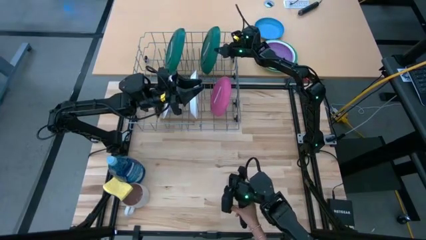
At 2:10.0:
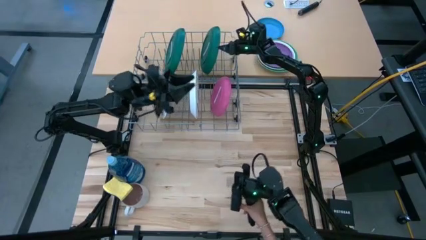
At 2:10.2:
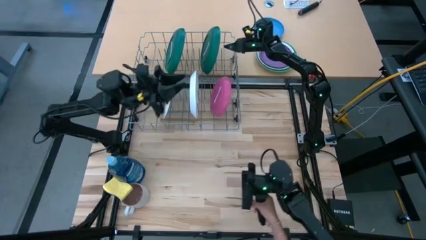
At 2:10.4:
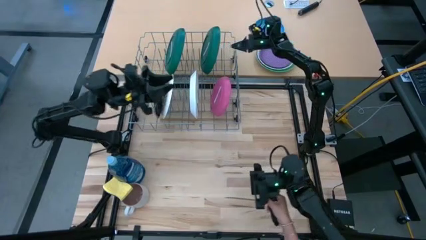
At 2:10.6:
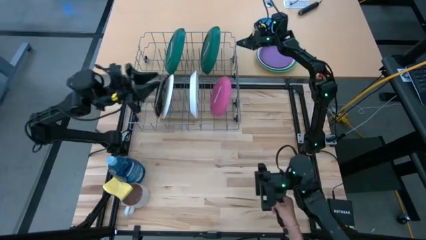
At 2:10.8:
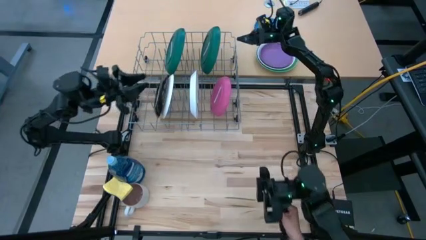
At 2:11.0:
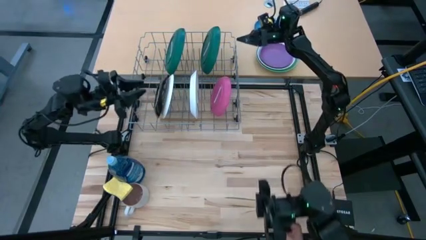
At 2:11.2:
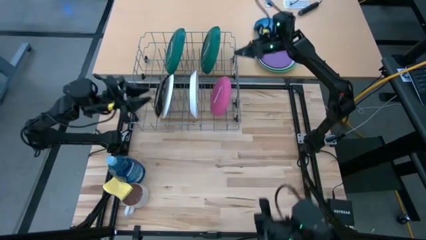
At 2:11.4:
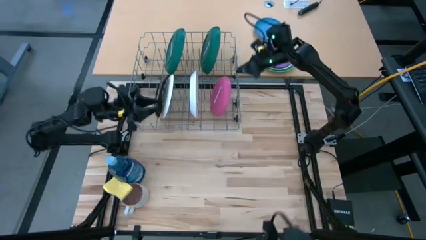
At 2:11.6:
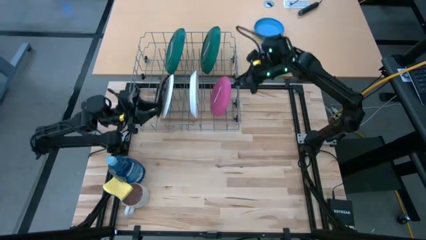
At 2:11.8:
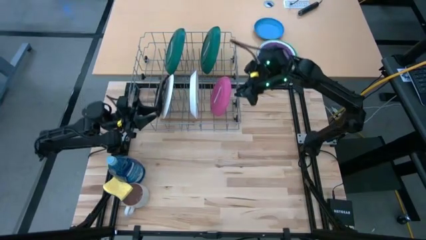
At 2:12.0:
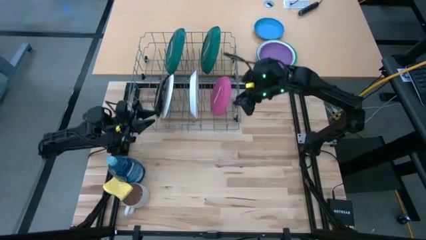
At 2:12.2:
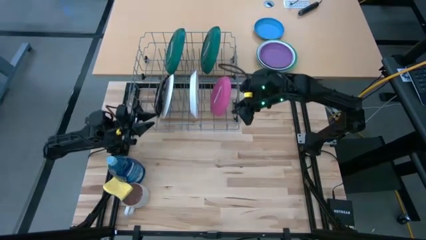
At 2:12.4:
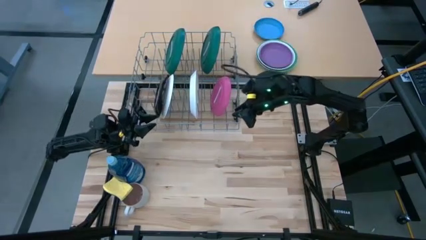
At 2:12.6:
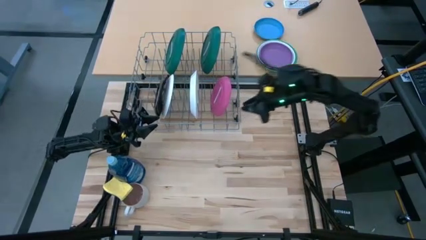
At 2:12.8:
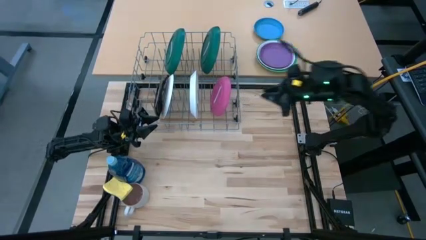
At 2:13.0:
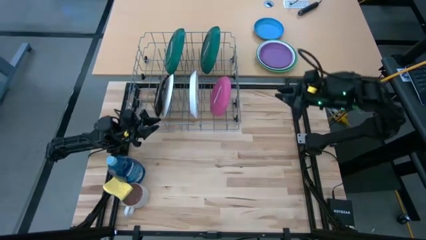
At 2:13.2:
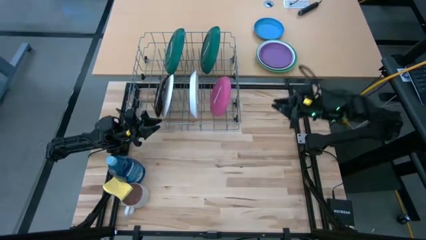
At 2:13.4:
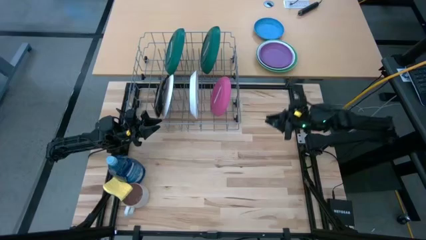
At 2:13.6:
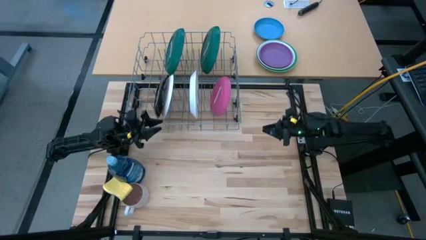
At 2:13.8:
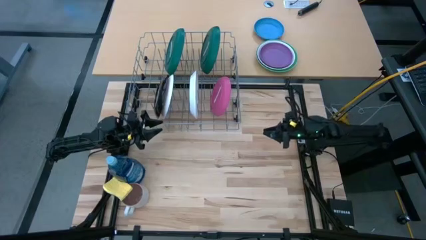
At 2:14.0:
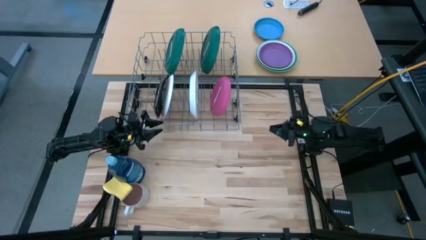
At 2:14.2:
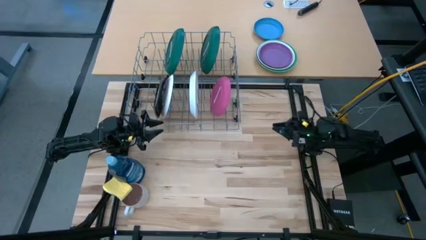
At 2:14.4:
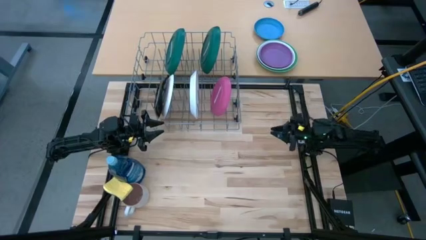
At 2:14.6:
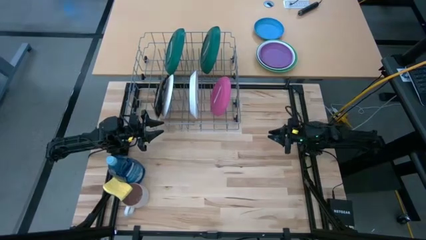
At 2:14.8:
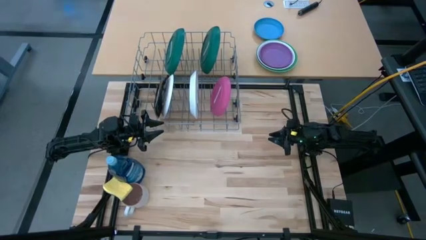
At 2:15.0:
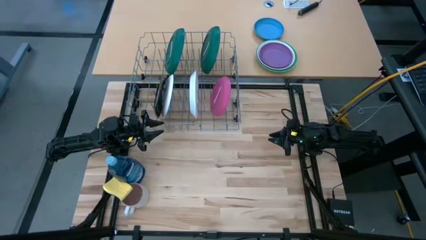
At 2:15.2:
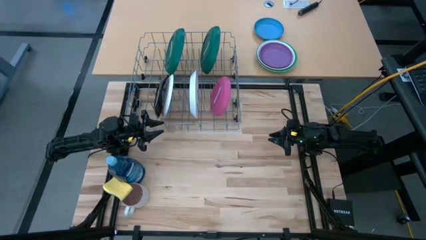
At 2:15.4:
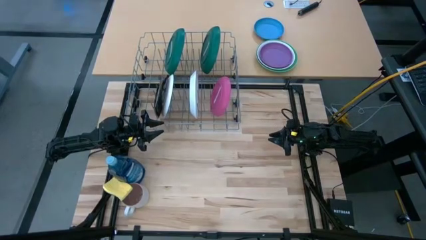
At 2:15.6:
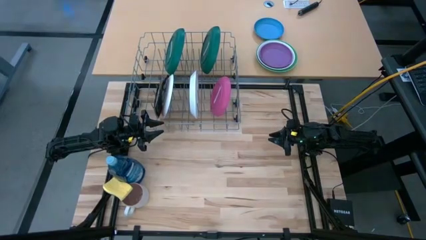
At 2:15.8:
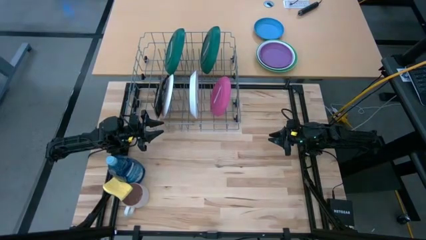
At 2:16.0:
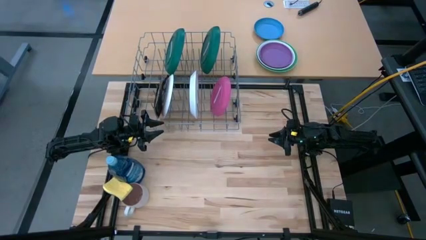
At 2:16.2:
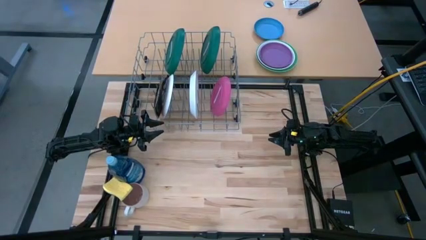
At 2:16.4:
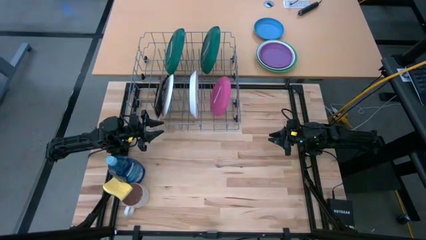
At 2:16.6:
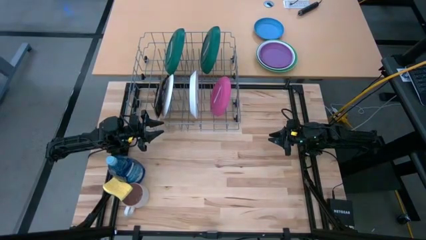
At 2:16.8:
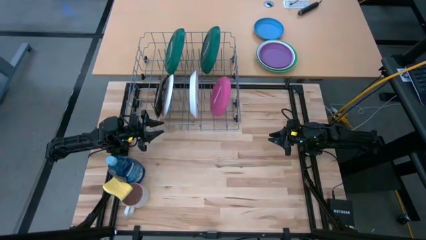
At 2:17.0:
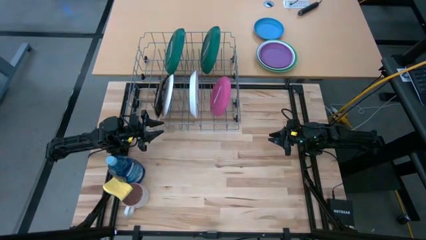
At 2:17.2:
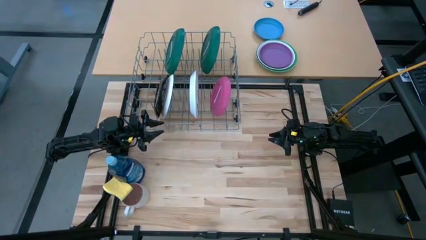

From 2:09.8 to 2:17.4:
Task: Sort dishes
Return to Home Position

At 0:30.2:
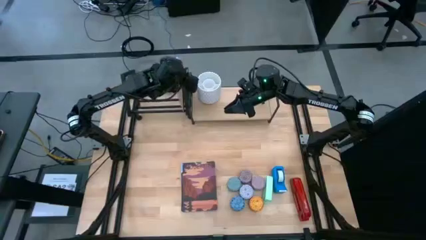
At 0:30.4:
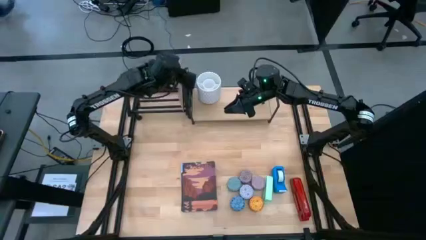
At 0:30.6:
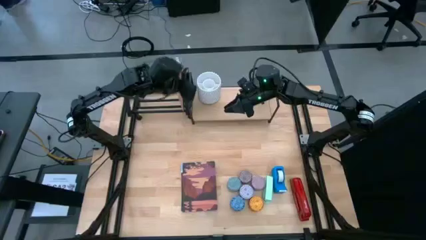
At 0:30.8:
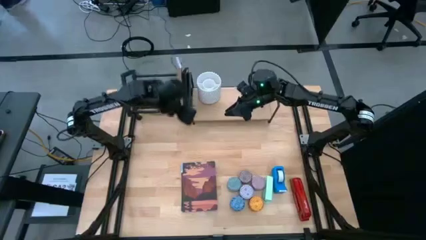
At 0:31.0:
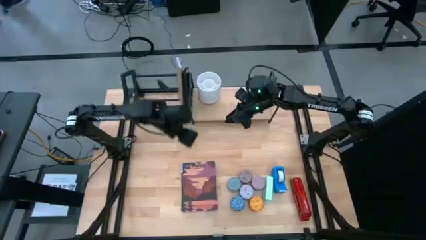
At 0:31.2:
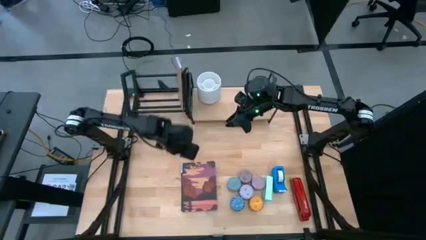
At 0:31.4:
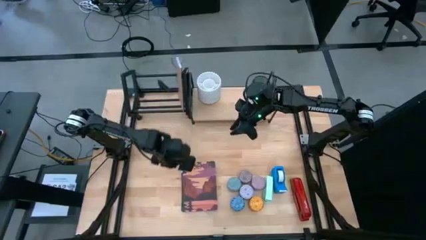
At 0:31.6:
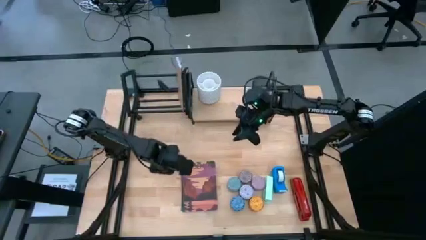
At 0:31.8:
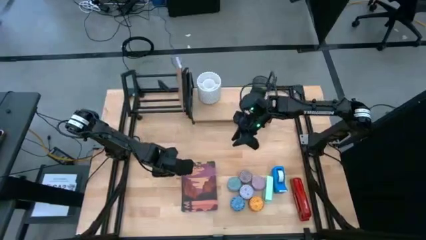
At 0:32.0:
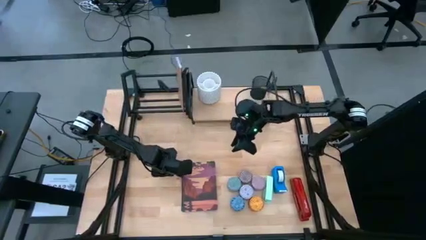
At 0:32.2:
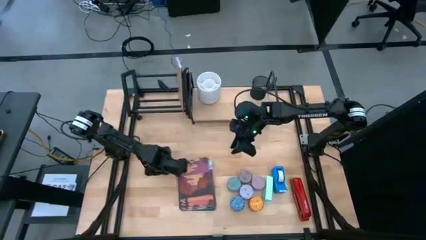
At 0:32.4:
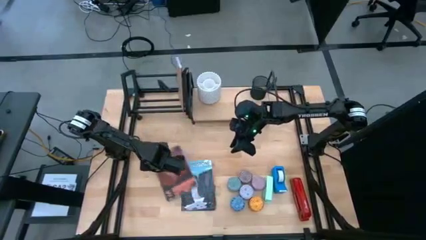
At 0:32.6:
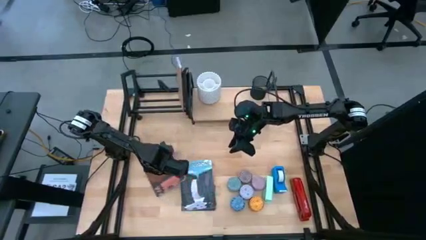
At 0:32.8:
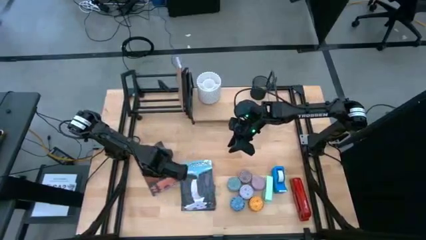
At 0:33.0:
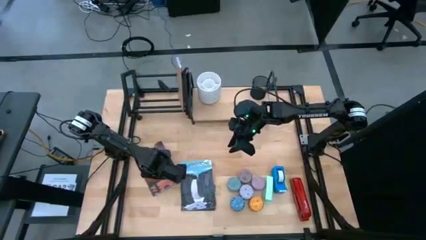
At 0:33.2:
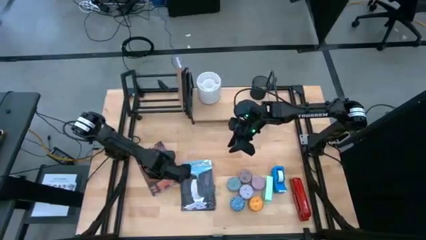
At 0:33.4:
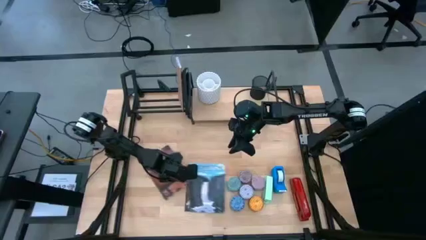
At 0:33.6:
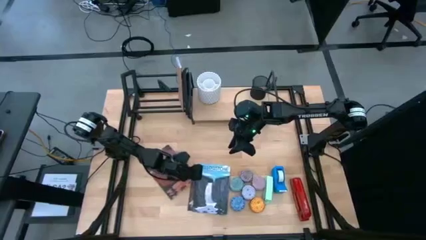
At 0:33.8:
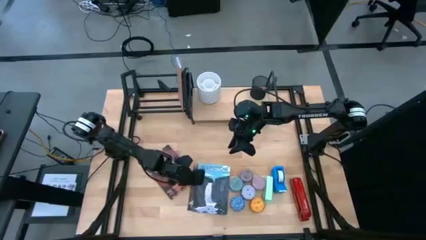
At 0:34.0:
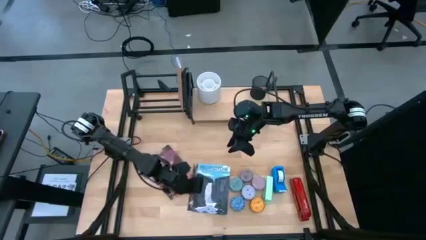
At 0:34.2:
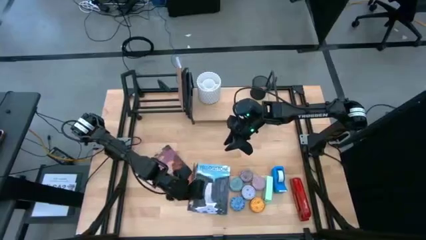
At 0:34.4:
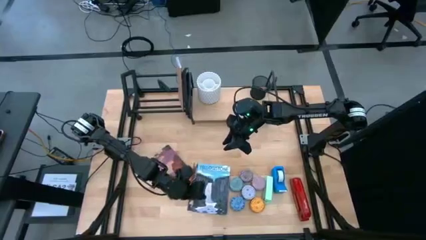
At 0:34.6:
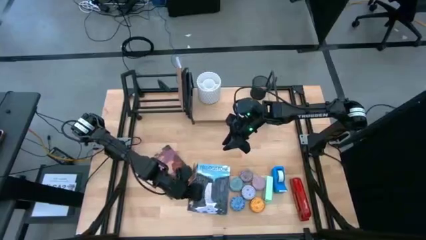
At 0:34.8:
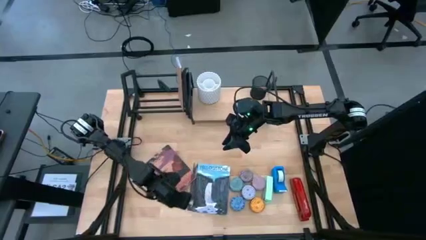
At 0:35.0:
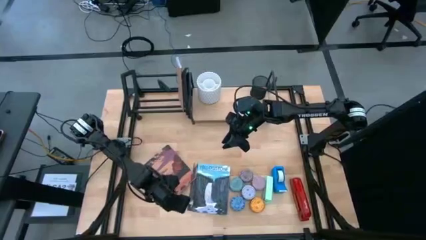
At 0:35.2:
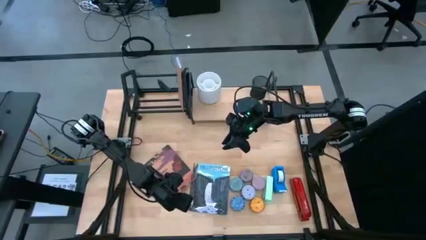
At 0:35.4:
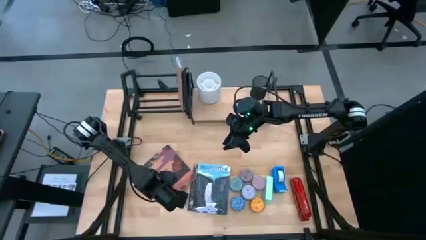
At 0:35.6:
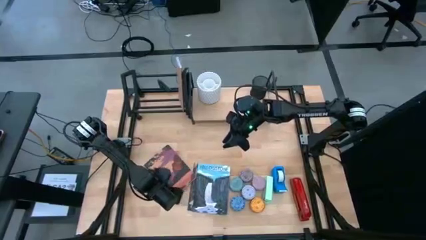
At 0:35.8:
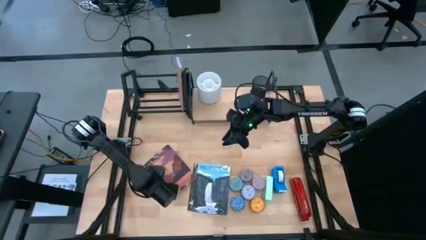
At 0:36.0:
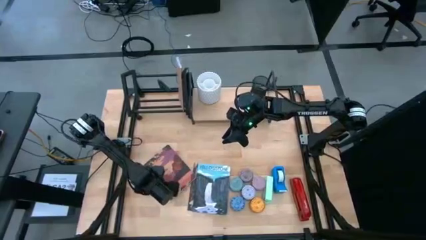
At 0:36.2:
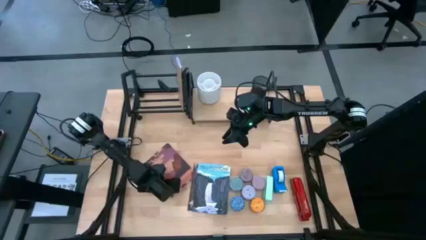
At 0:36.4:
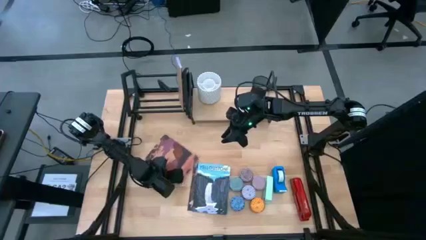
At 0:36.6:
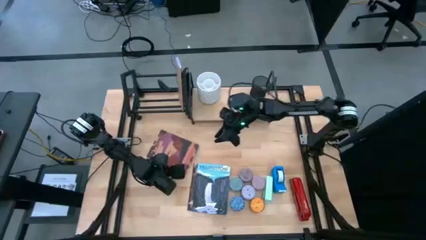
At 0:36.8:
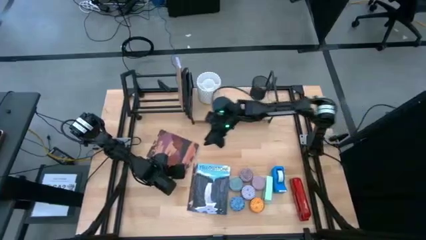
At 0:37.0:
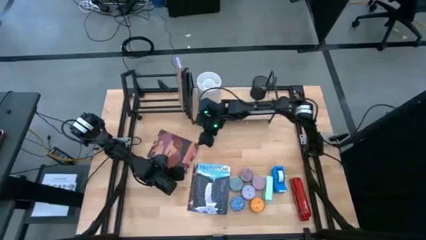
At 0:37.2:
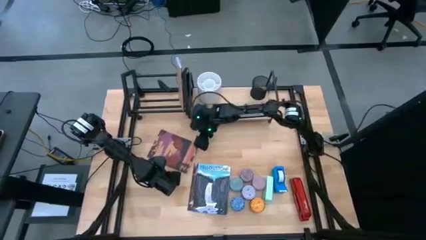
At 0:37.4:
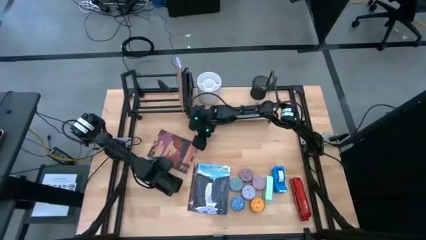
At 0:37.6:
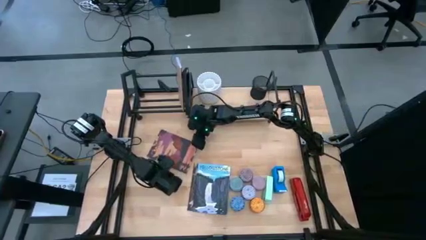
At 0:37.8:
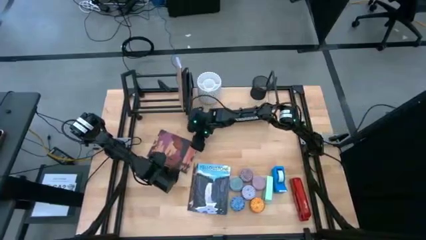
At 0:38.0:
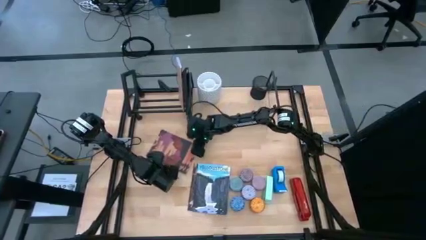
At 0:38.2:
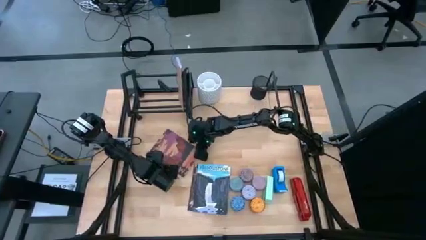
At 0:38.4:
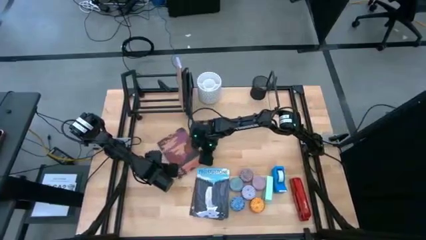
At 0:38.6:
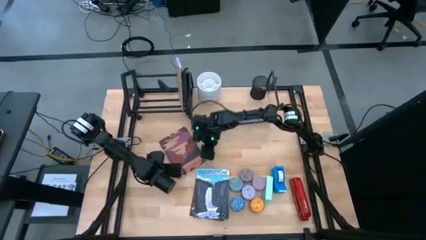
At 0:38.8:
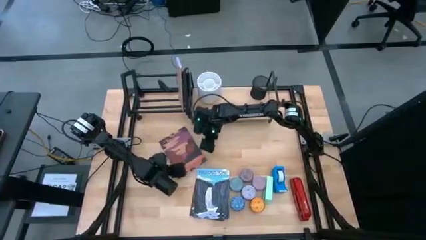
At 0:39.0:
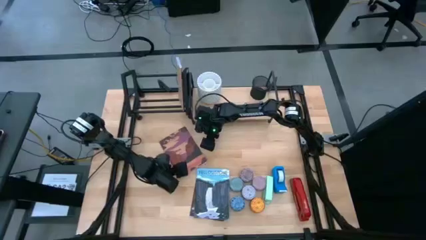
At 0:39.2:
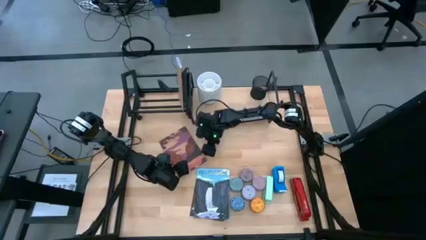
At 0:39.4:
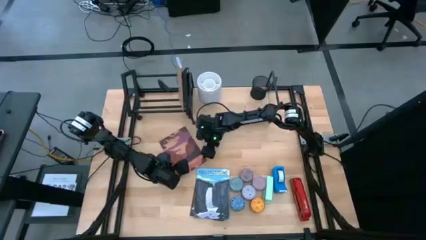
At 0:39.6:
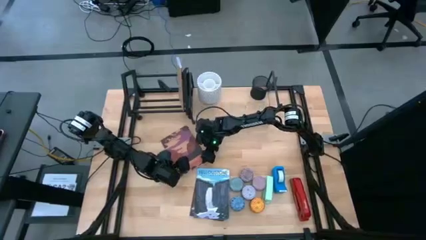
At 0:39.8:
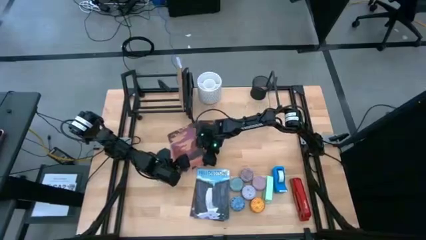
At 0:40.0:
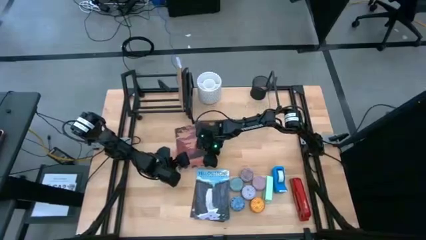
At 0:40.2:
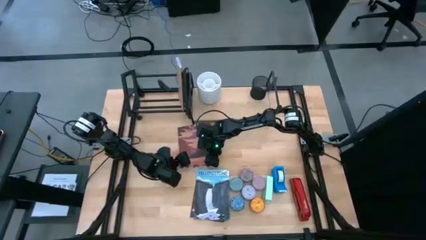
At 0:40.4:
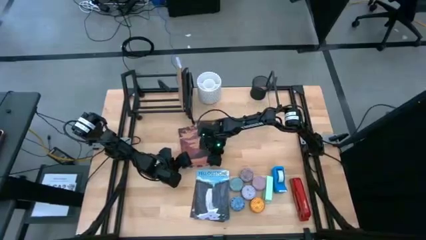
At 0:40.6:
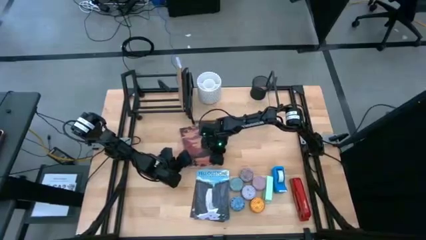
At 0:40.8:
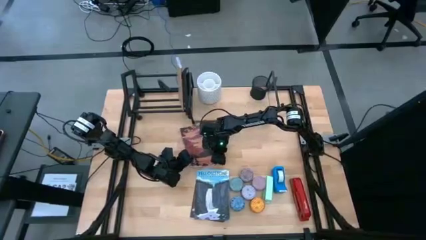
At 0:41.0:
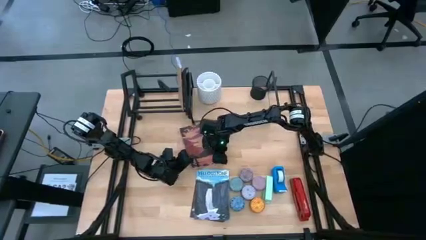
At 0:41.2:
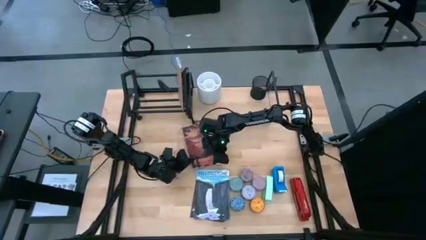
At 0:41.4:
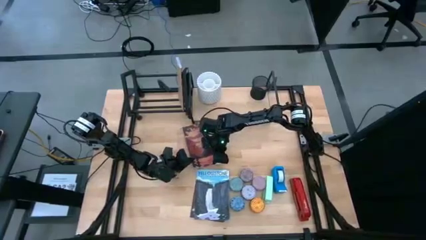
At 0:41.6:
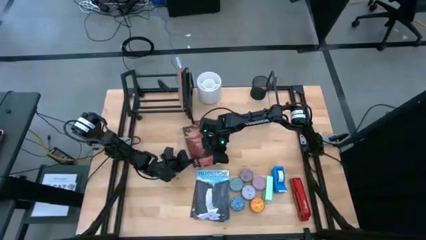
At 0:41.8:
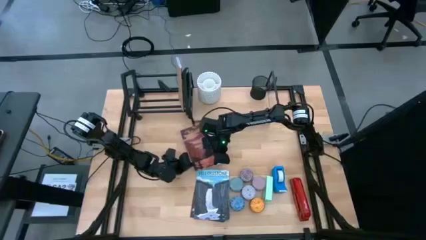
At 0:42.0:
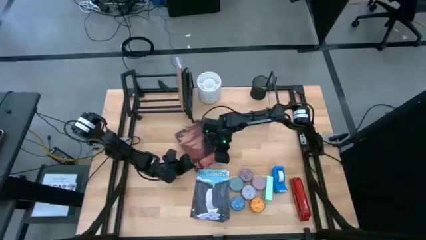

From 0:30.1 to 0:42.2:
Task: Stock shelves
Put the brown book on the bookshelf
